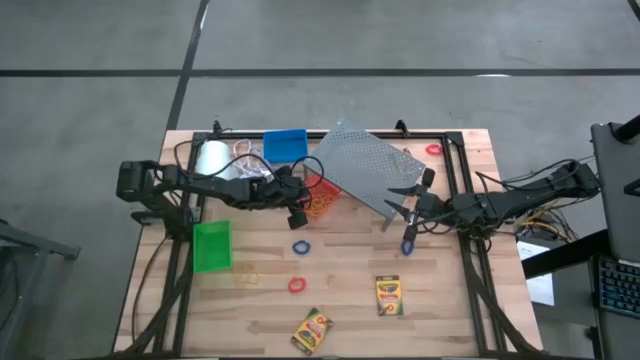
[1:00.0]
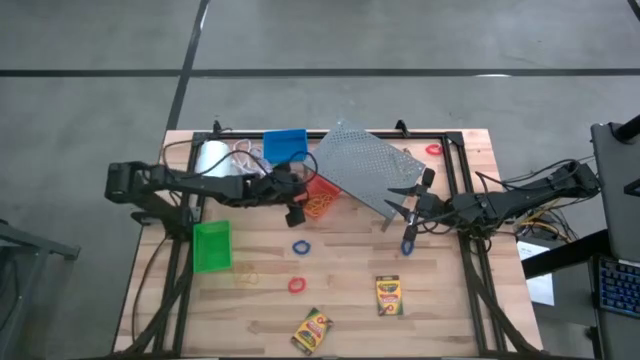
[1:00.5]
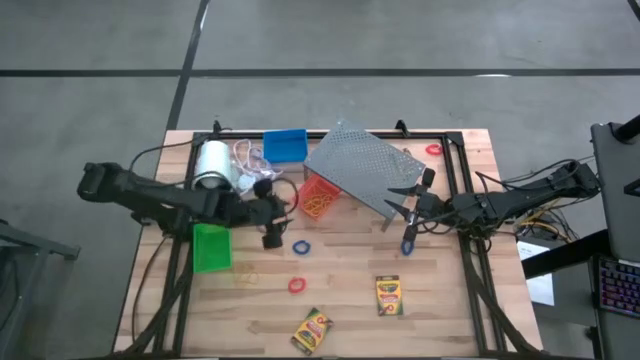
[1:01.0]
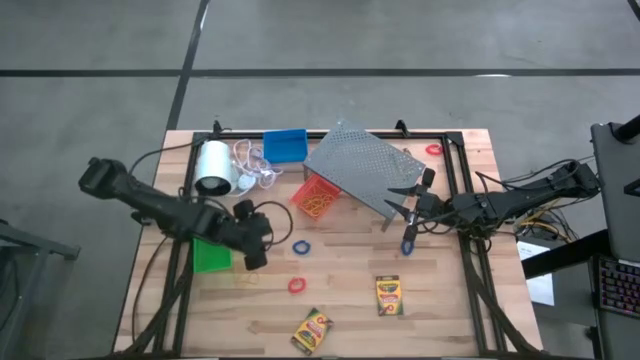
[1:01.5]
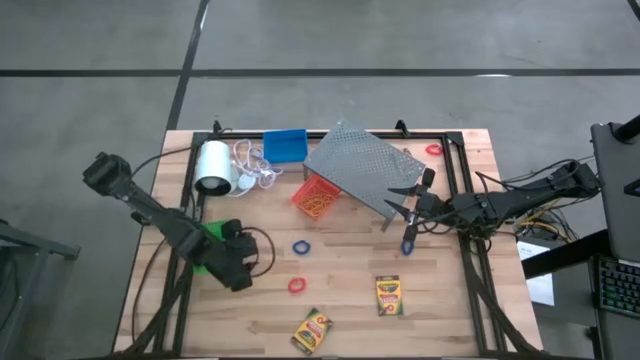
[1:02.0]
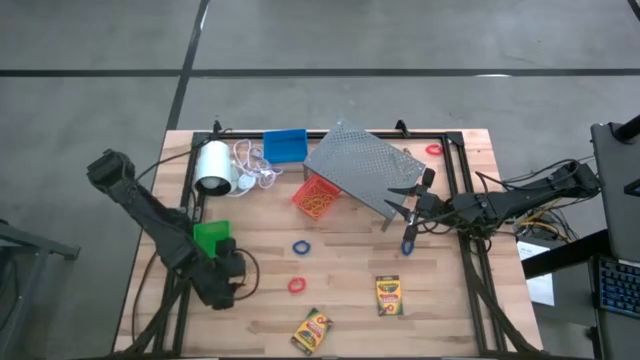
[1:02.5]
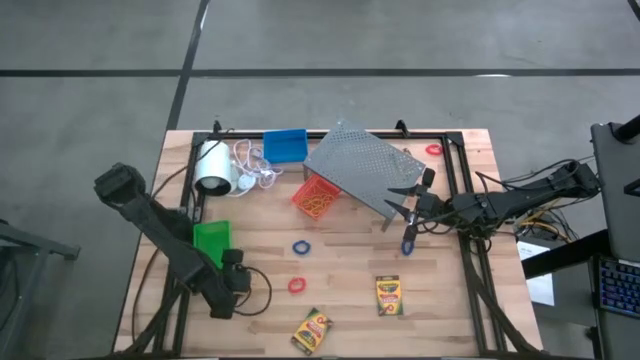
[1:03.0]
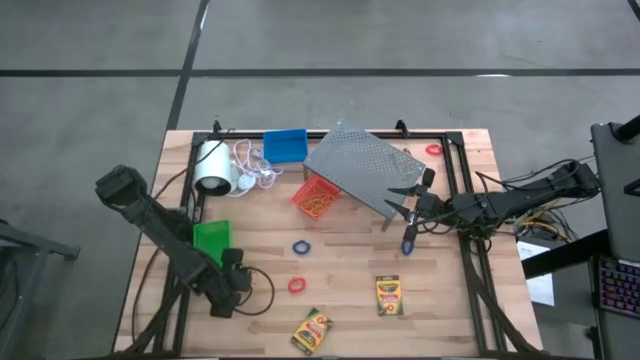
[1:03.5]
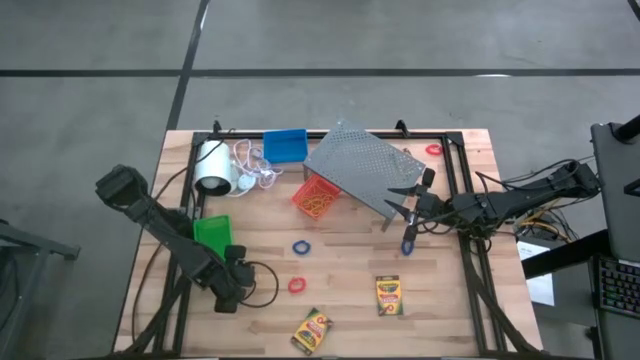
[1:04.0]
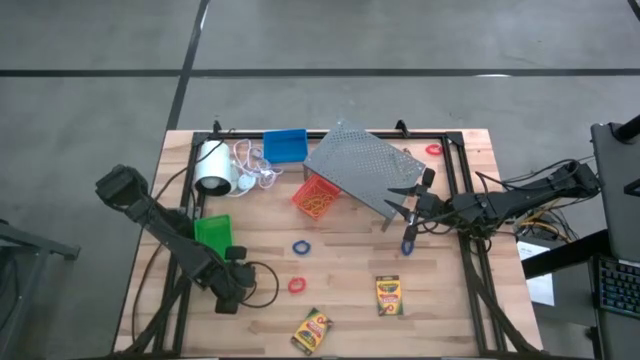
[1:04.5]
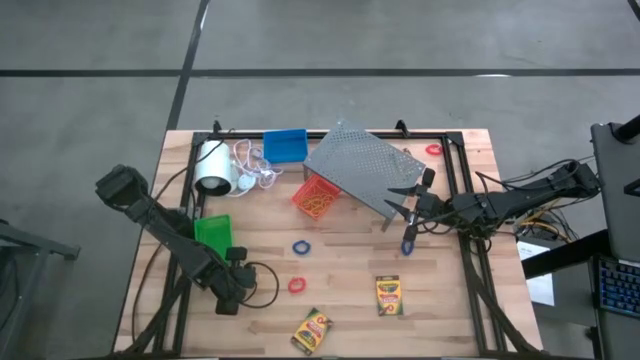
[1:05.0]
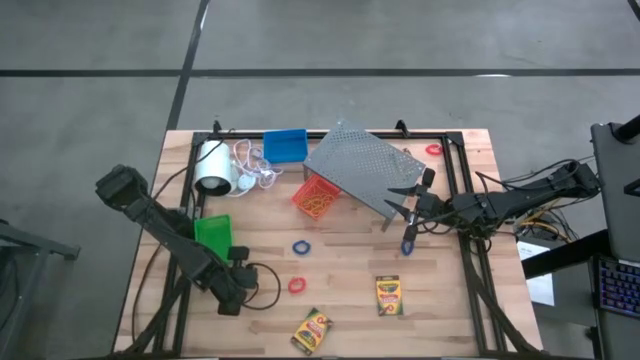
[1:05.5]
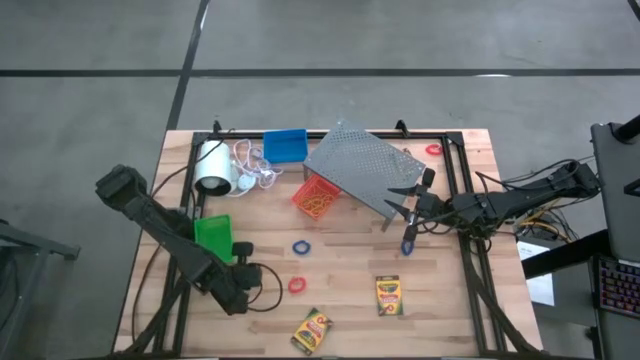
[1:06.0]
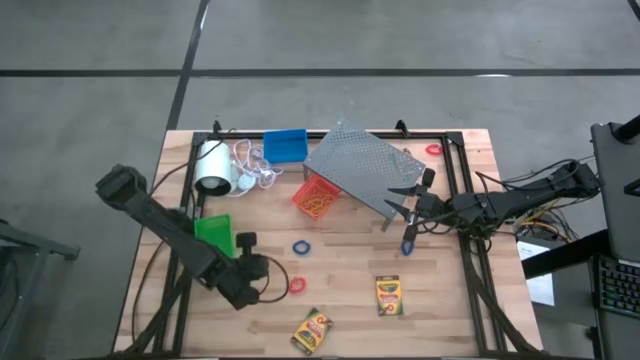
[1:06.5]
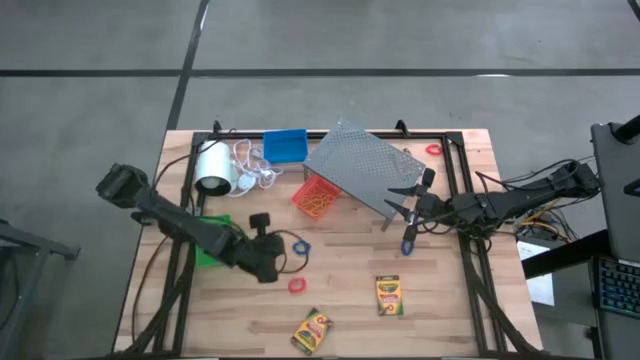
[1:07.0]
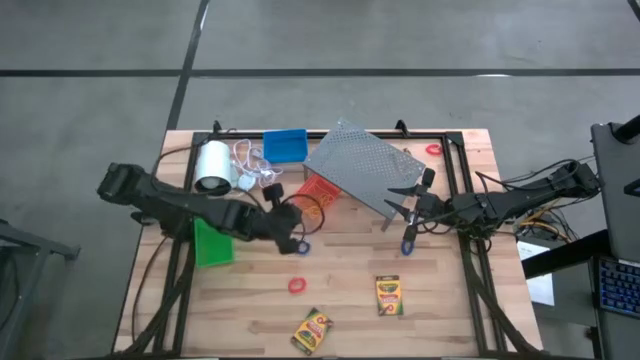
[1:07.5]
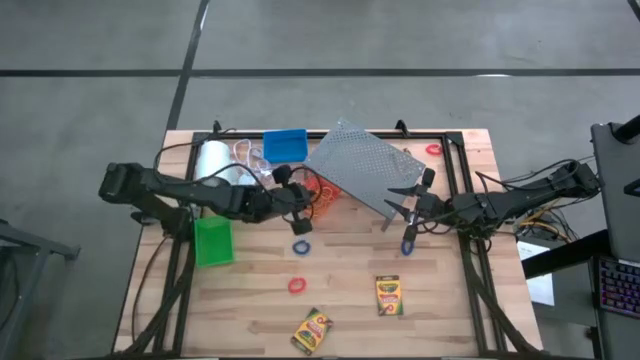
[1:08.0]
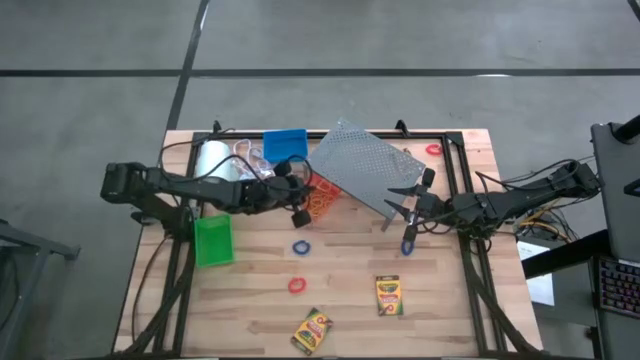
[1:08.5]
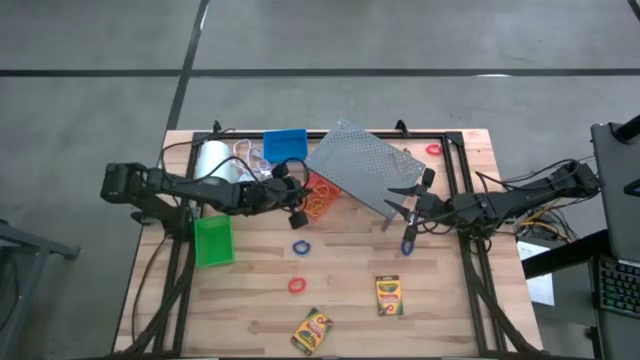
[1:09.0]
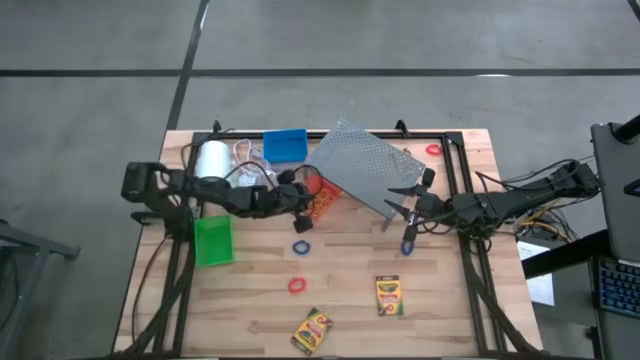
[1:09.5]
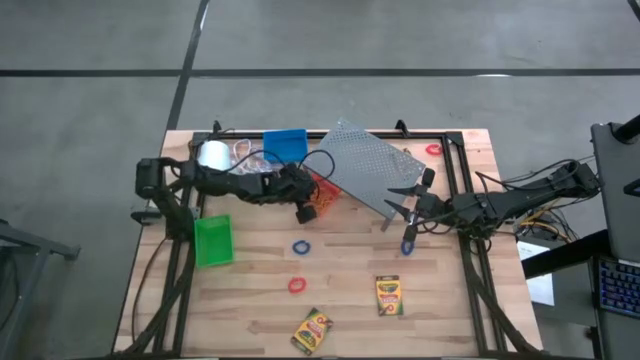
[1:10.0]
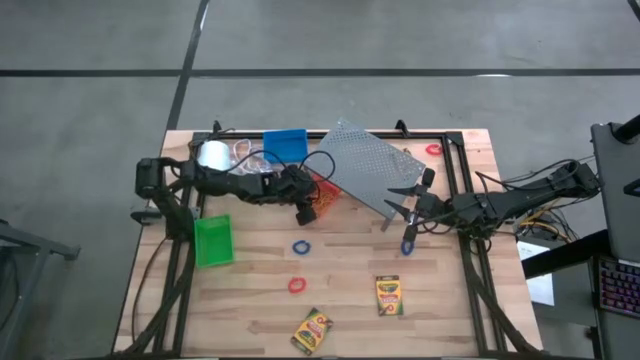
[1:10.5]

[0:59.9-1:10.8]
Task: Pick & Place Office Desk Supplies
Put the yellow rubber band into the orange bin

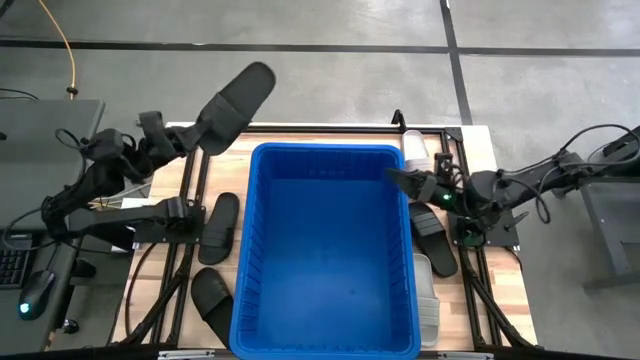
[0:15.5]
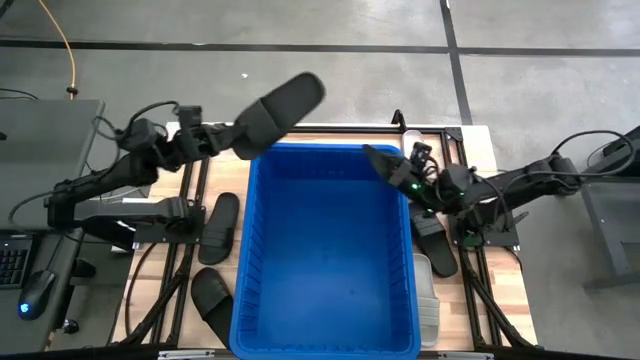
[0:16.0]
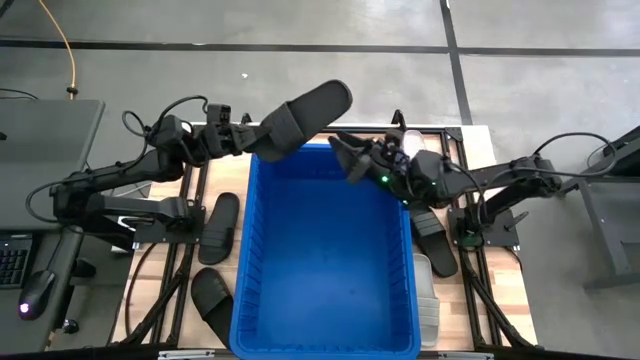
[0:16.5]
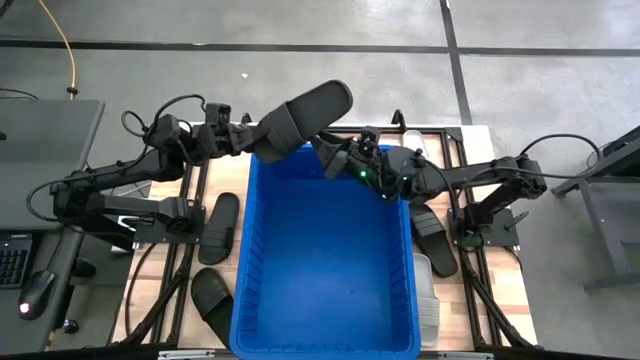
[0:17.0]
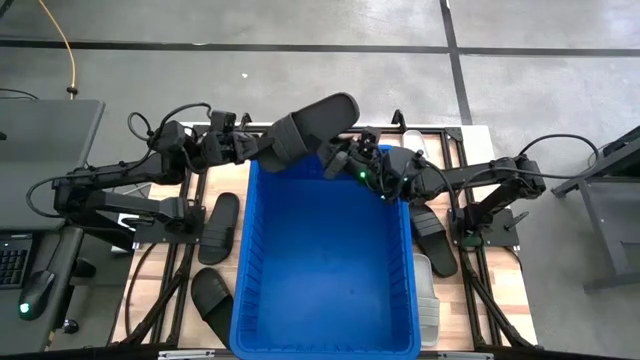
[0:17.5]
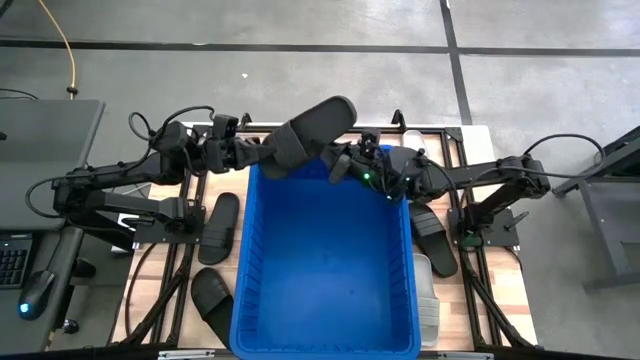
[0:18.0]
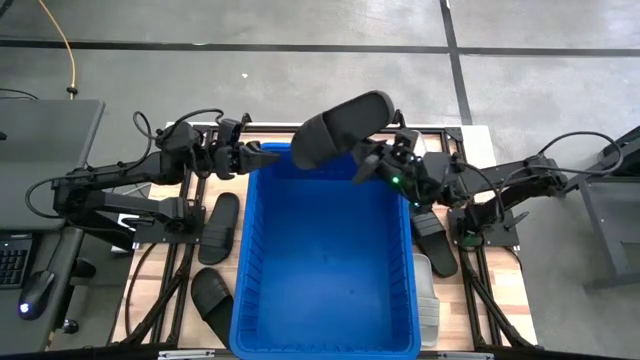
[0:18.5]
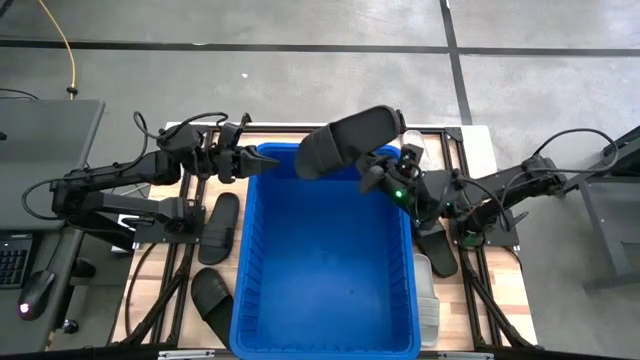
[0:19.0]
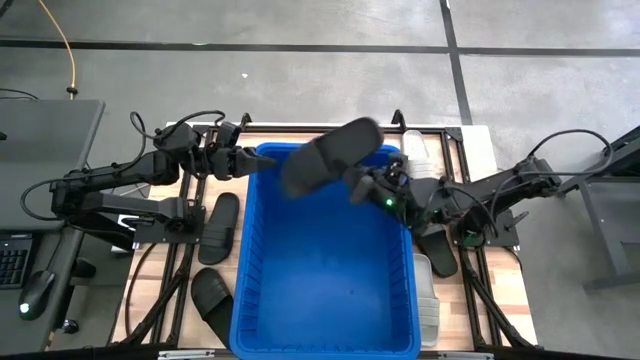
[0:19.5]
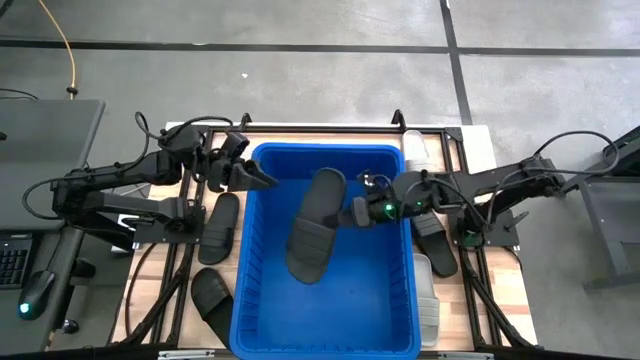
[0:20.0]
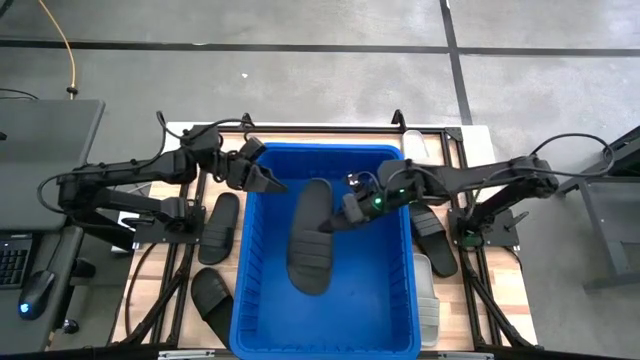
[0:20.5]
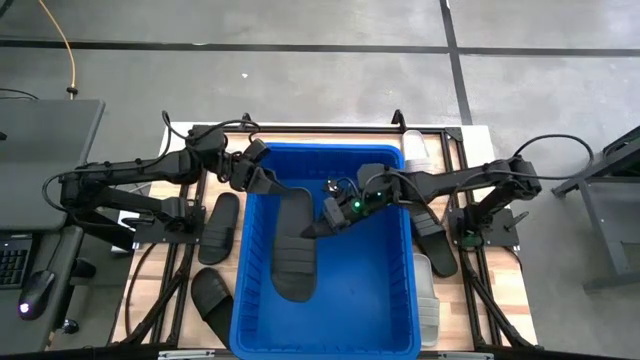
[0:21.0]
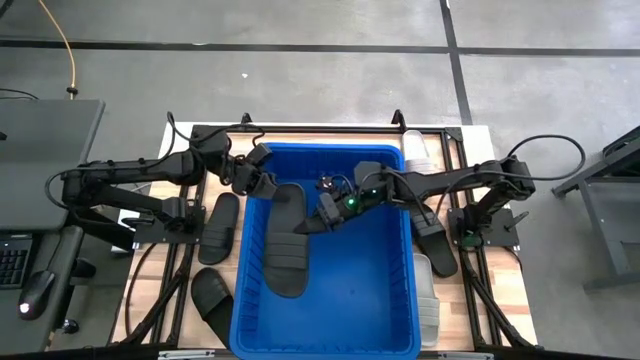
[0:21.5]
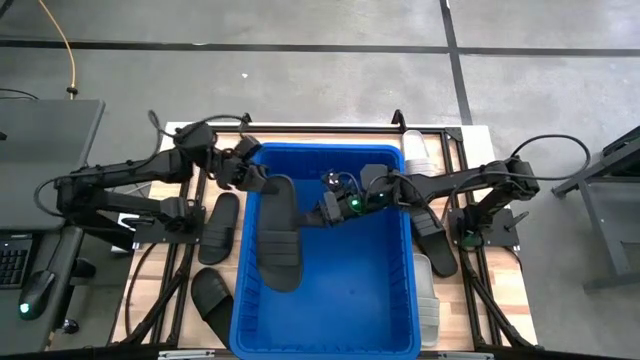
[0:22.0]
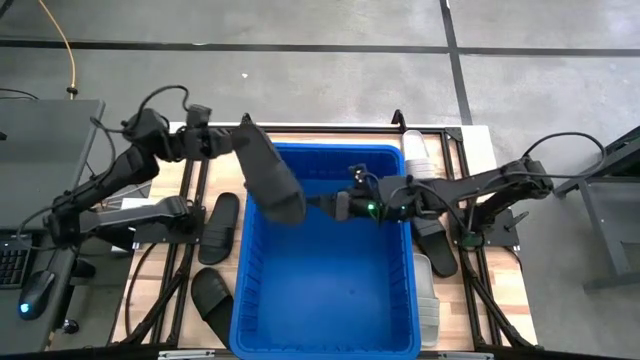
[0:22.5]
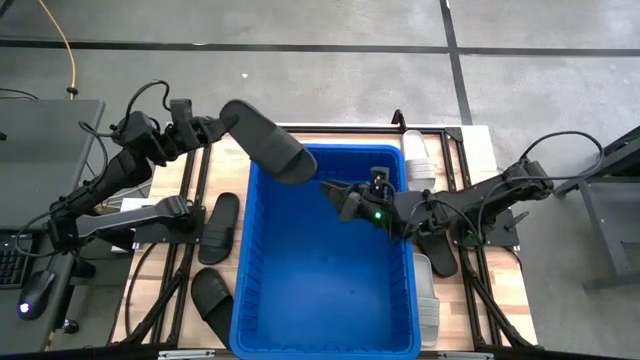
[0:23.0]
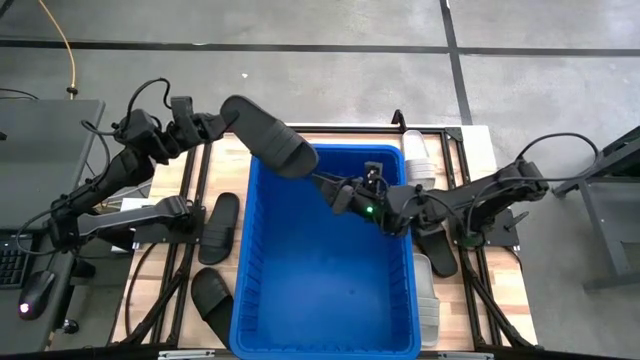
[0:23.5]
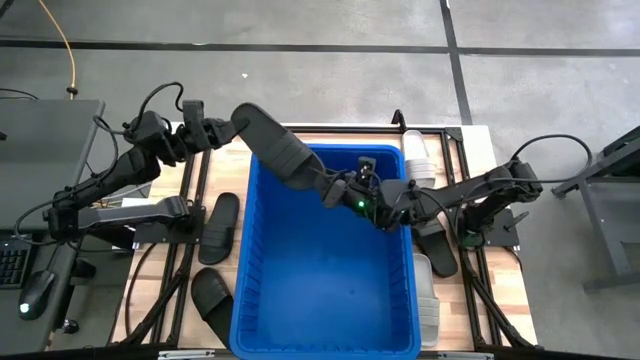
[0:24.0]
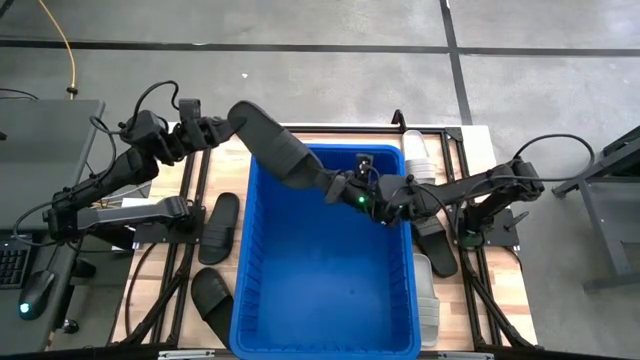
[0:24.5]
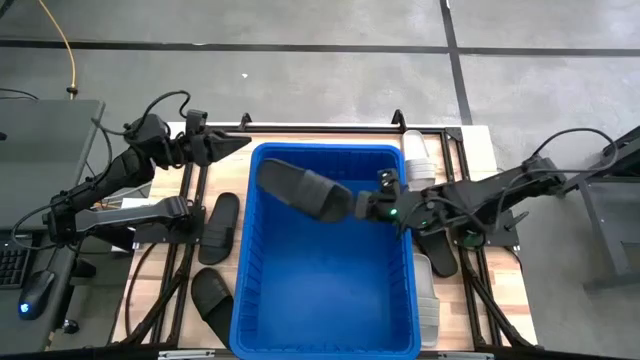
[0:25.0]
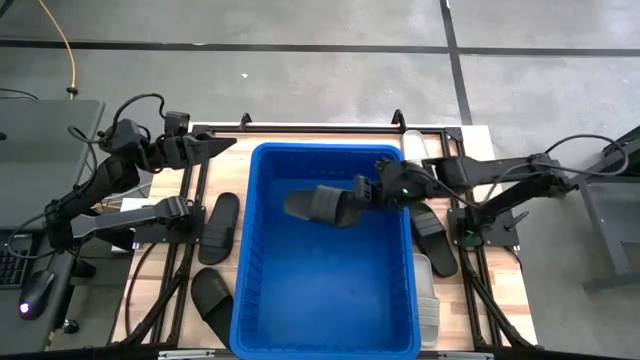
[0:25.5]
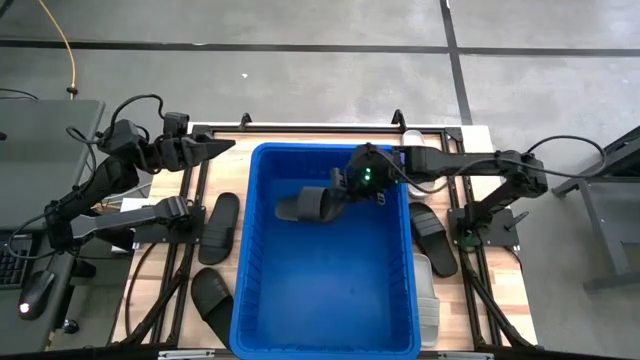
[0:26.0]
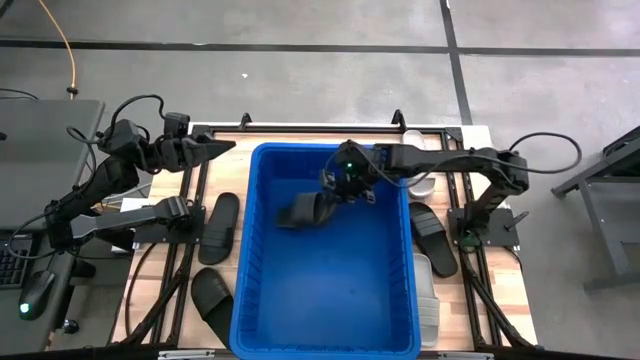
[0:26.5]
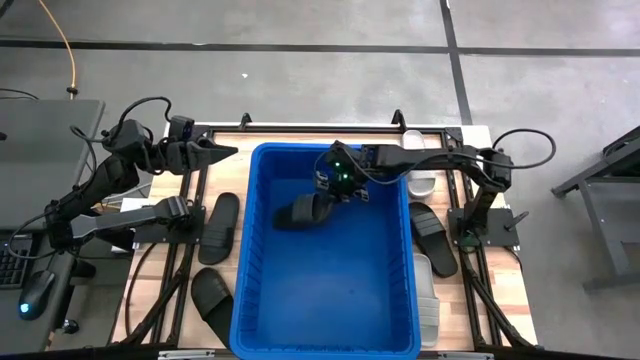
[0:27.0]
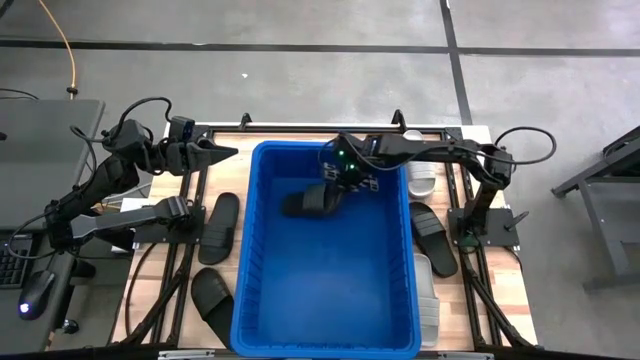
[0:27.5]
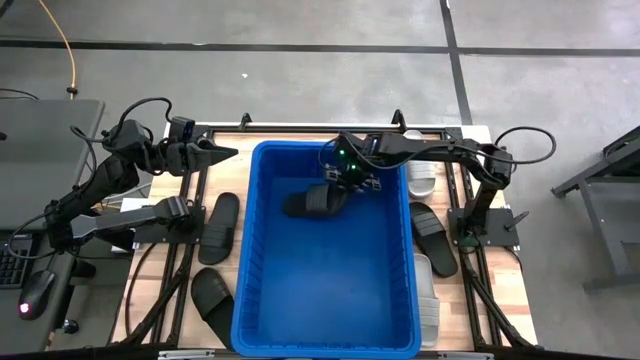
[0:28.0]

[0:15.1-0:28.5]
Task: Pick and place slides into bin
Put the top left black slide in the bin
